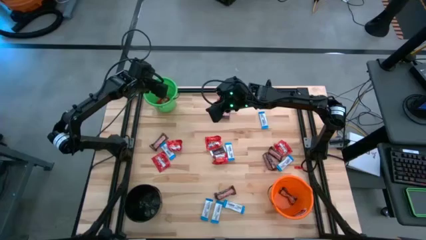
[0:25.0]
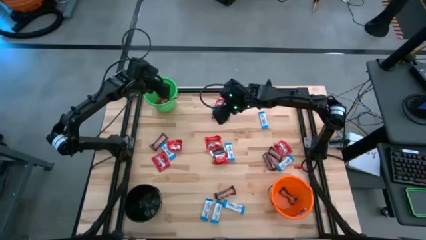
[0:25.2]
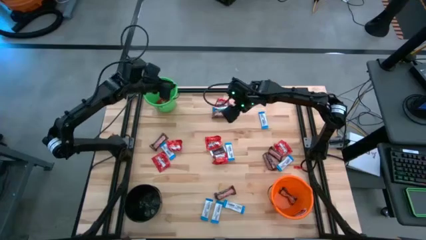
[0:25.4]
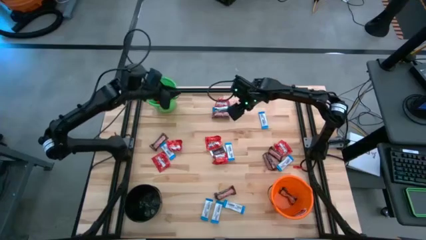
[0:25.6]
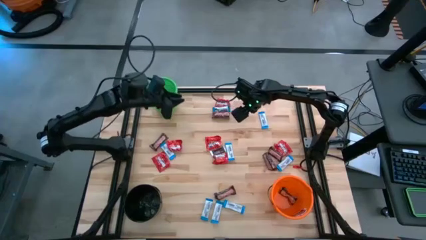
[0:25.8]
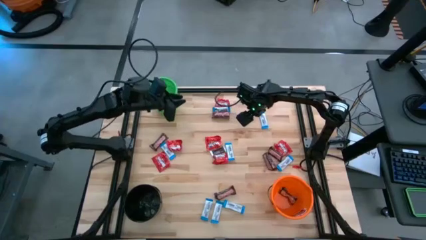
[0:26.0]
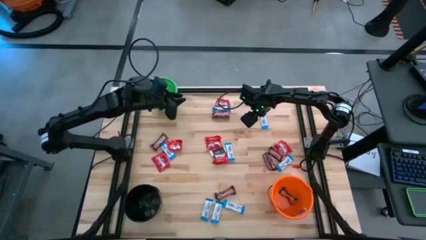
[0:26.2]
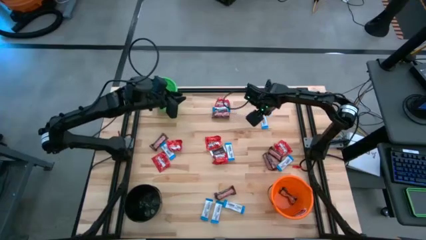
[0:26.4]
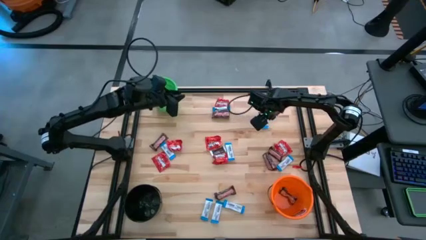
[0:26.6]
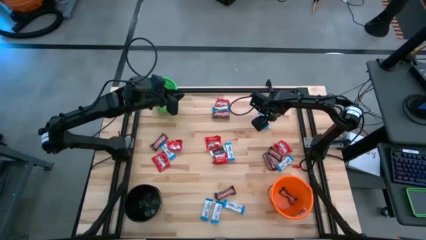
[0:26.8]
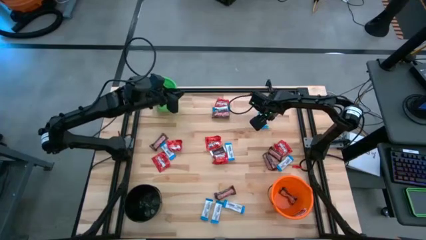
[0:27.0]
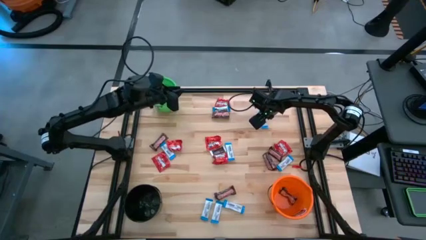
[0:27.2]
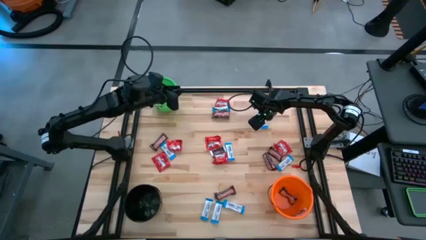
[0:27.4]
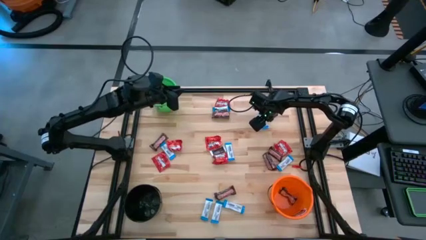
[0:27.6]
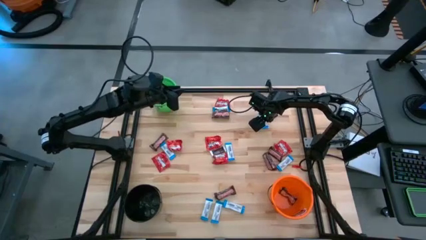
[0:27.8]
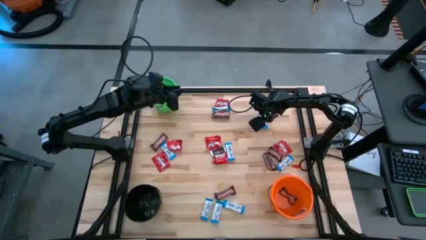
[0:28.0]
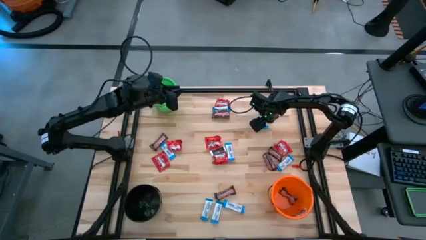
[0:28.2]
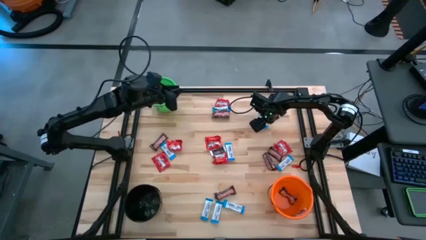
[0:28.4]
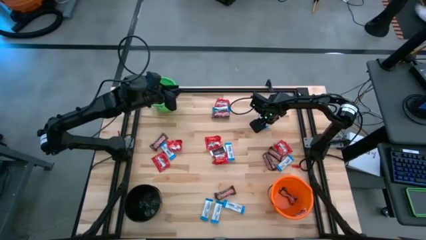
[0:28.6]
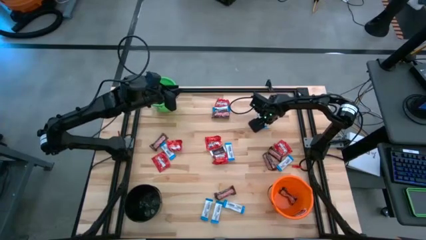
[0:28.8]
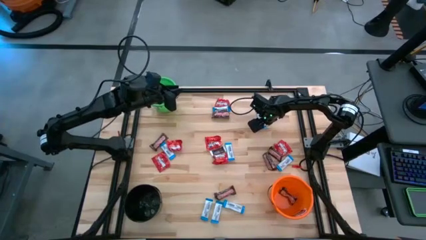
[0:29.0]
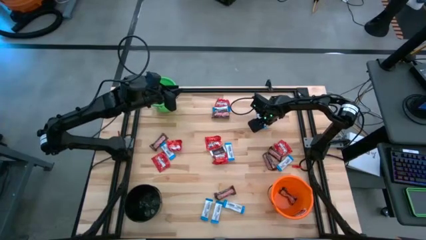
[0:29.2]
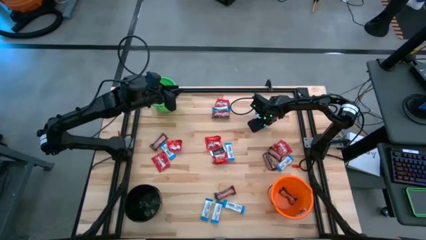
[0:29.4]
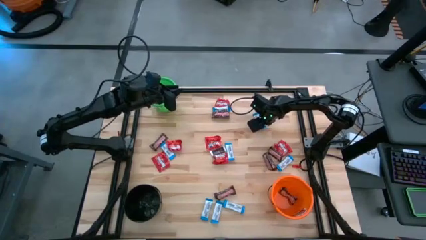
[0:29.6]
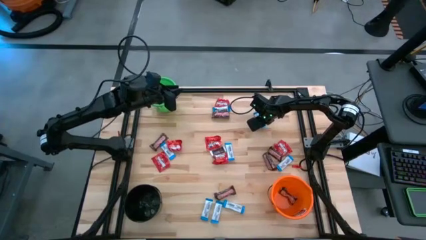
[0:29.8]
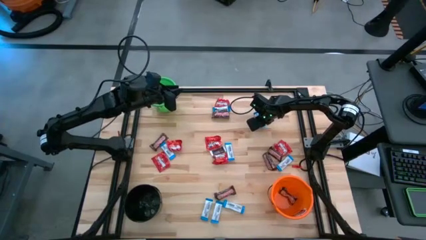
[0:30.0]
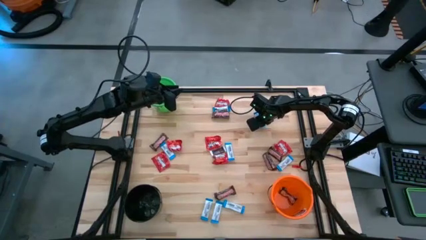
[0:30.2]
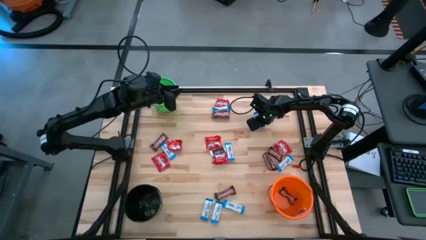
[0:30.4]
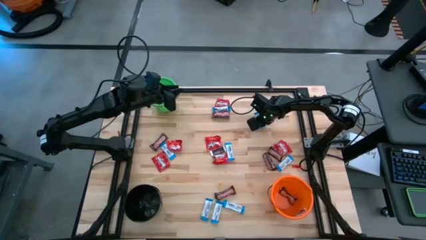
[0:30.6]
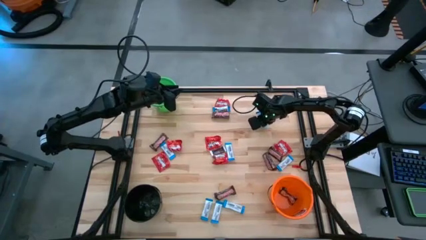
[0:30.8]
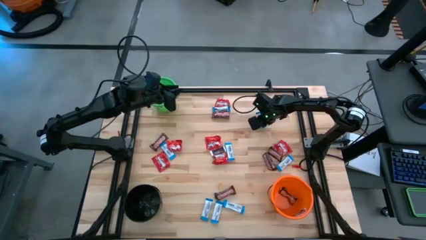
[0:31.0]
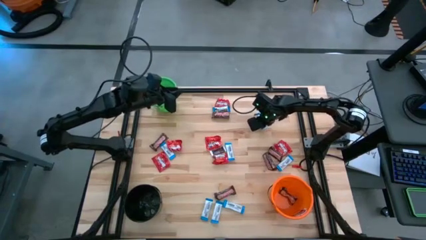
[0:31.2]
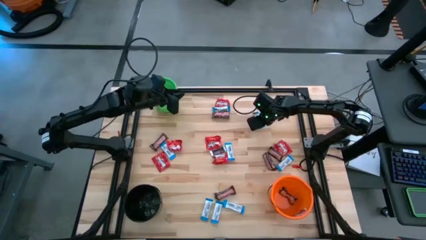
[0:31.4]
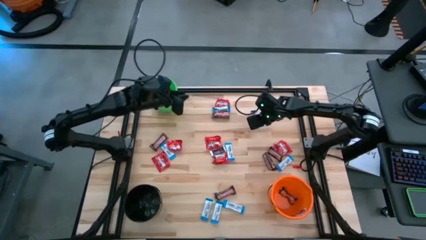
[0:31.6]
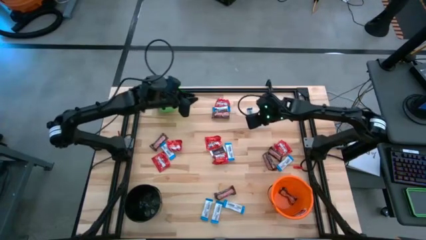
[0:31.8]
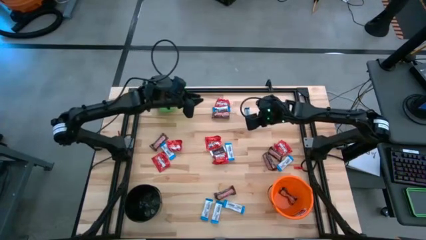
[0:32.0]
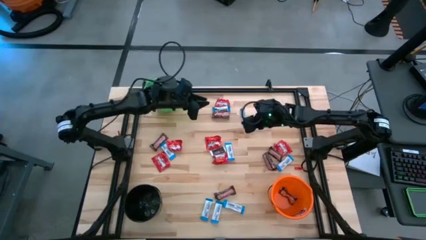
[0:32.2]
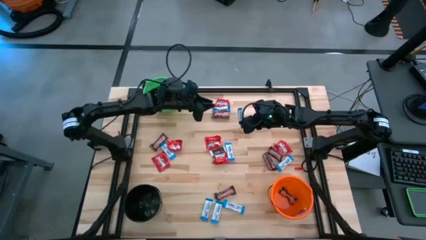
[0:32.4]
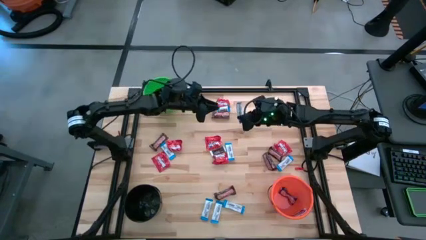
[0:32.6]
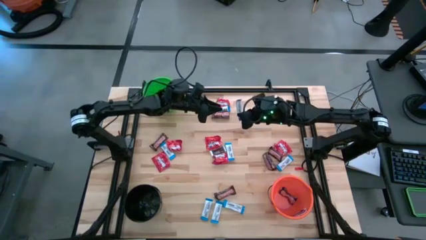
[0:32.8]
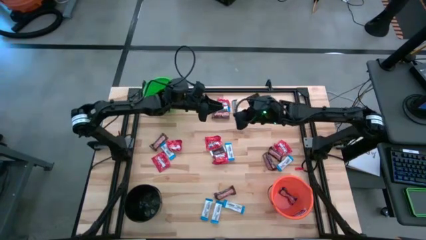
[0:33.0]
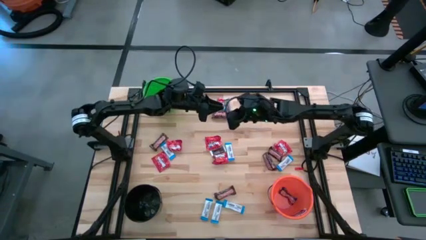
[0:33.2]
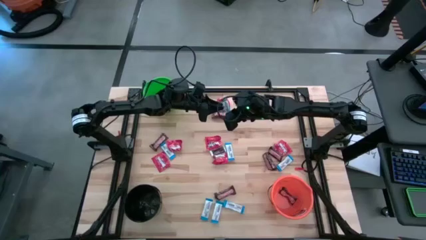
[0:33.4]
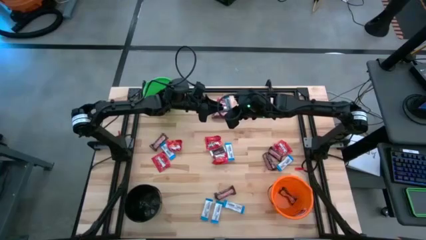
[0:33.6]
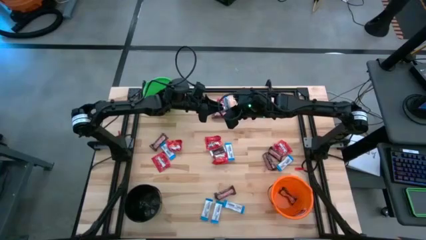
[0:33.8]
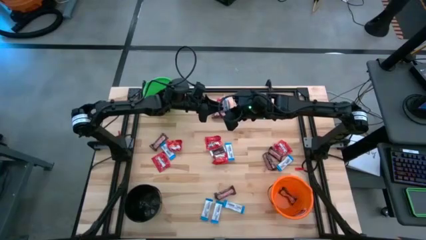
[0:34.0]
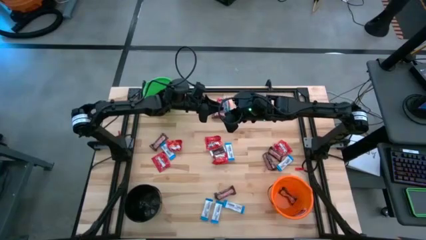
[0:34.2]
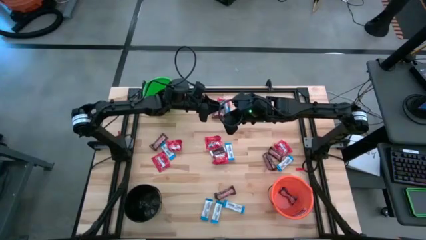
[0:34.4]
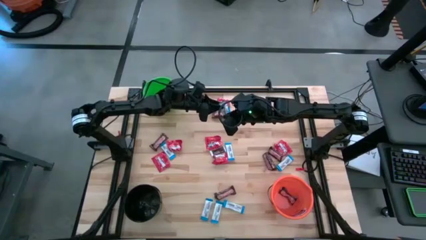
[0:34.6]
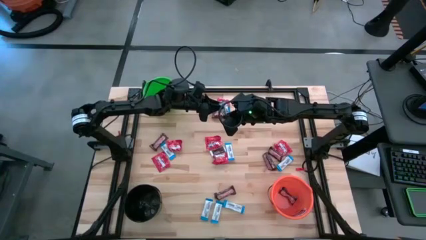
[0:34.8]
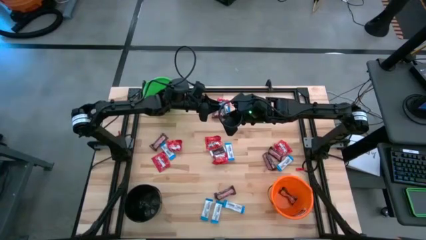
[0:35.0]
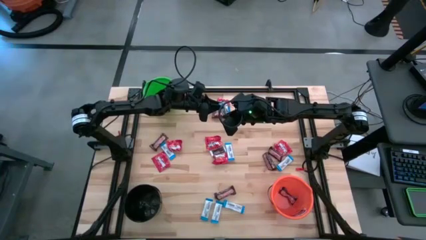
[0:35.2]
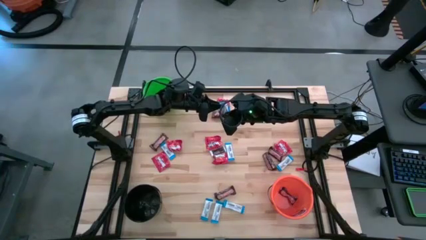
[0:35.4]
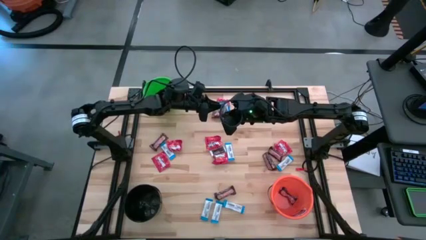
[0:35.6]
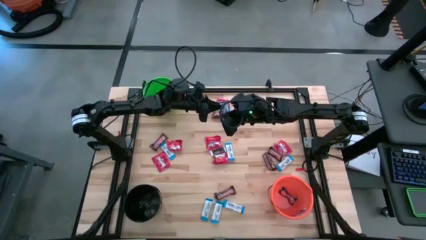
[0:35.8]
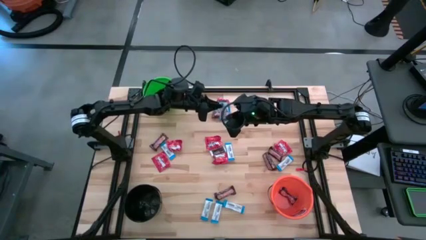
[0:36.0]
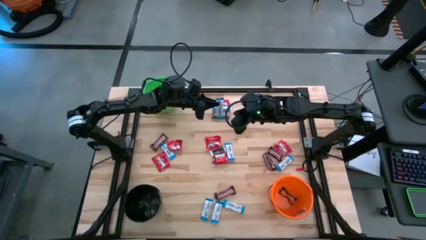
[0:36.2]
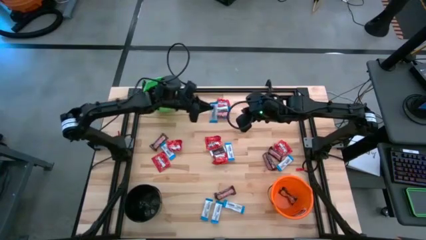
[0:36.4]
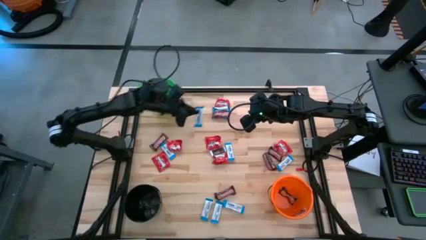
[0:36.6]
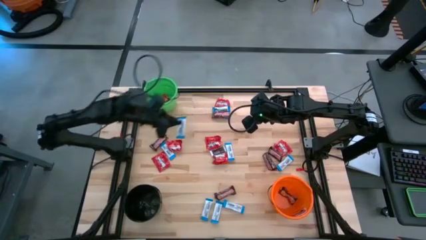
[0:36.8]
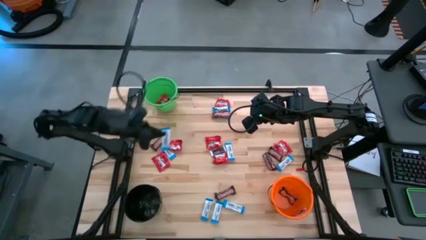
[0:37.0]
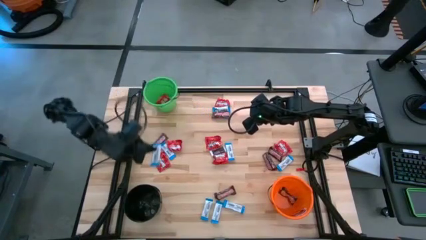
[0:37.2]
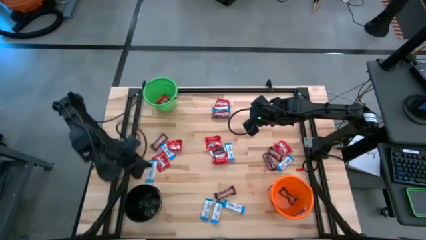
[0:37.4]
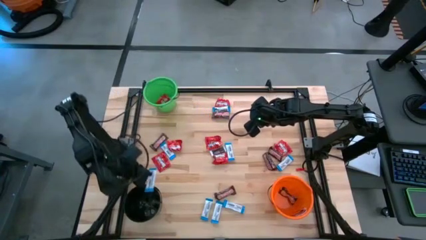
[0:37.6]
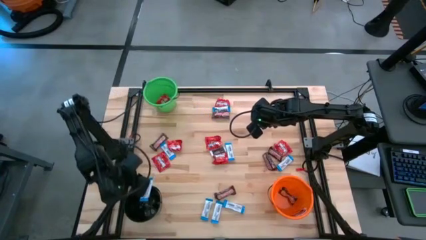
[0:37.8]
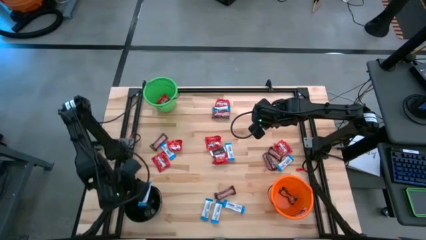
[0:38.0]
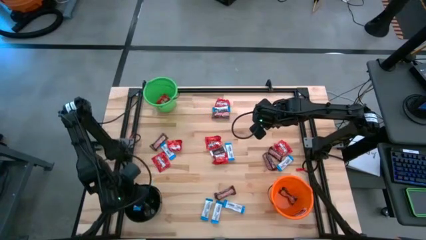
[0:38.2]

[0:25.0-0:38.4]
Task: Sort candy
Put the white chocolate into the black bucket

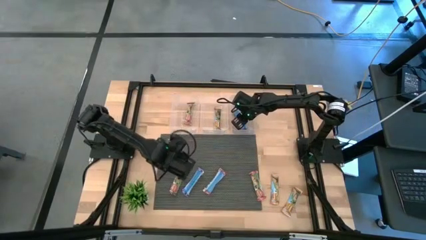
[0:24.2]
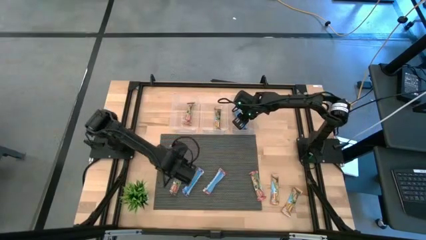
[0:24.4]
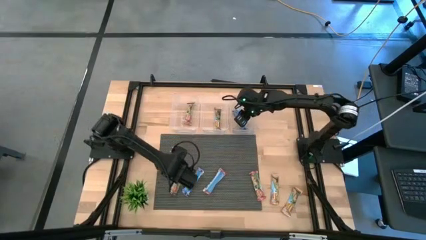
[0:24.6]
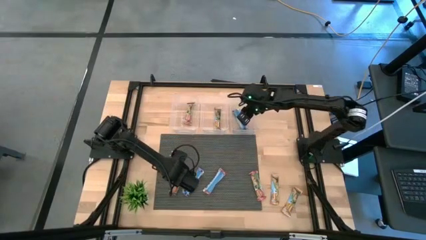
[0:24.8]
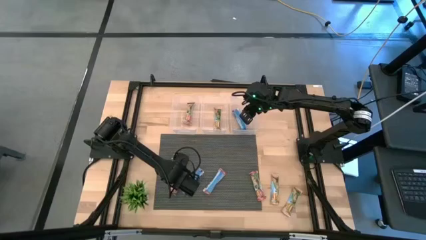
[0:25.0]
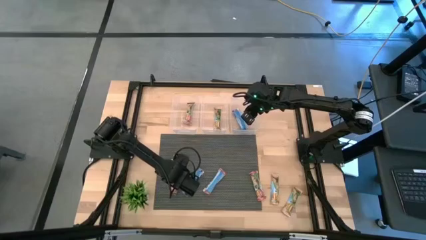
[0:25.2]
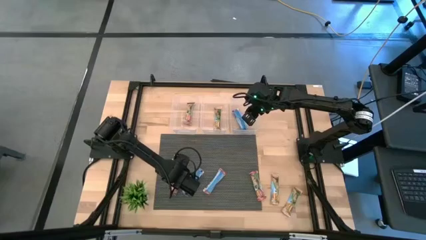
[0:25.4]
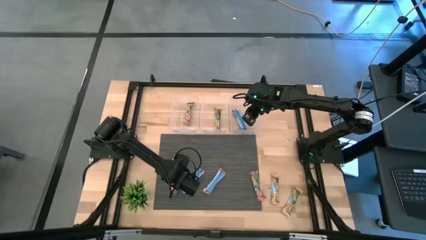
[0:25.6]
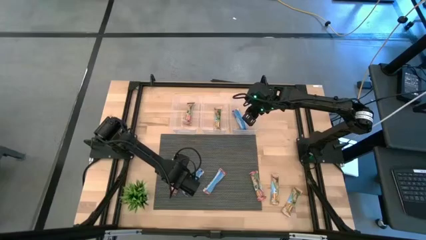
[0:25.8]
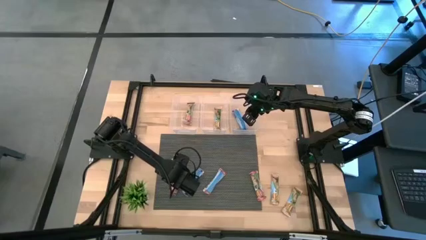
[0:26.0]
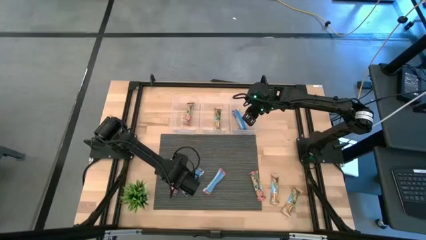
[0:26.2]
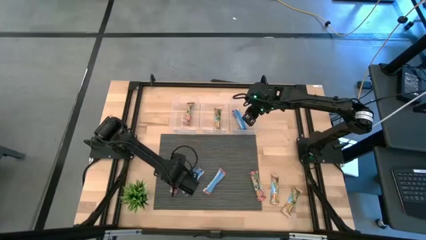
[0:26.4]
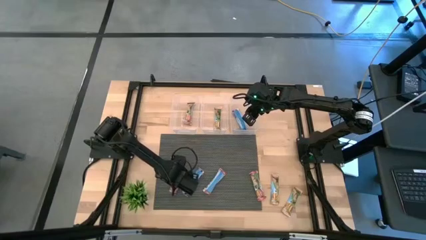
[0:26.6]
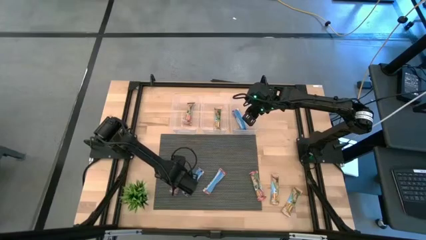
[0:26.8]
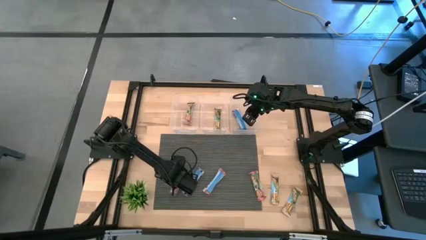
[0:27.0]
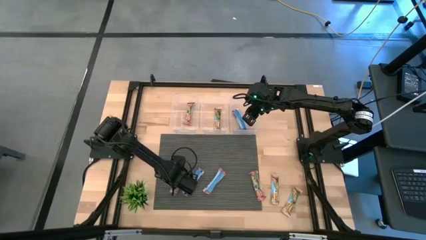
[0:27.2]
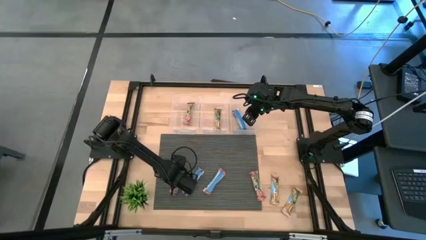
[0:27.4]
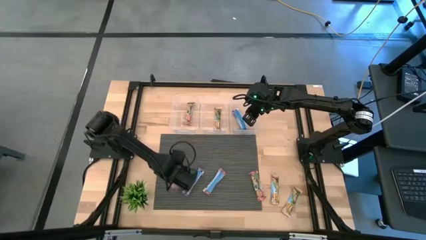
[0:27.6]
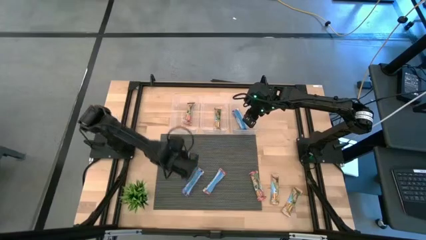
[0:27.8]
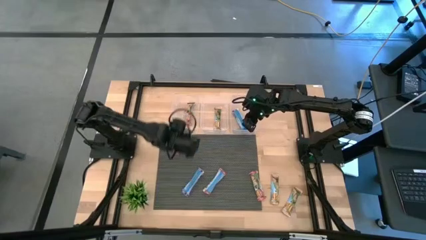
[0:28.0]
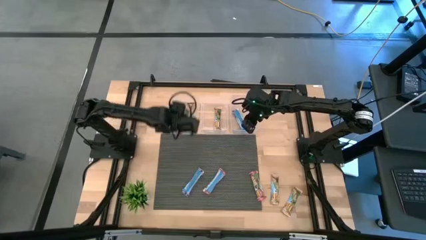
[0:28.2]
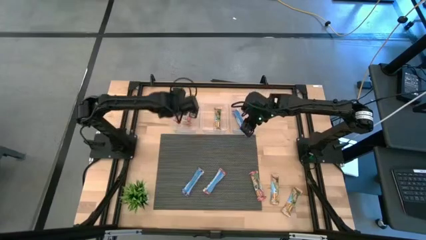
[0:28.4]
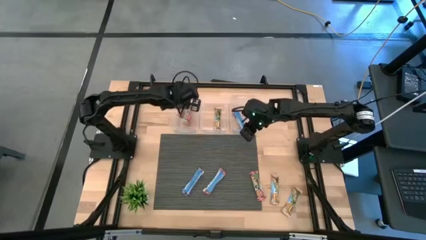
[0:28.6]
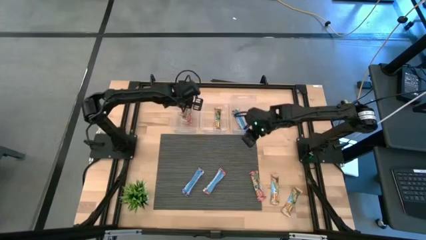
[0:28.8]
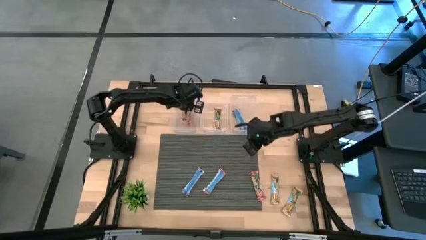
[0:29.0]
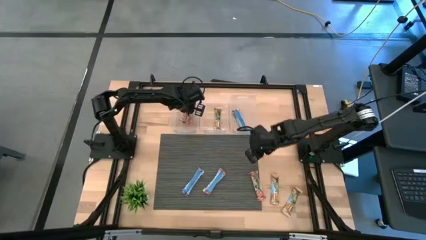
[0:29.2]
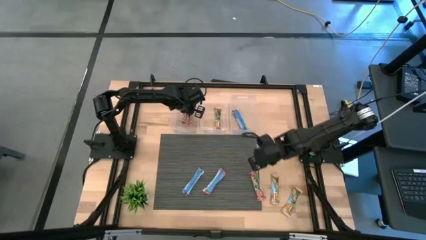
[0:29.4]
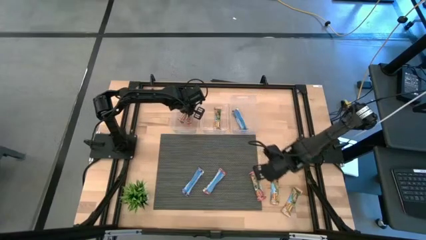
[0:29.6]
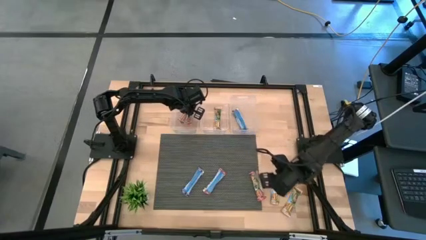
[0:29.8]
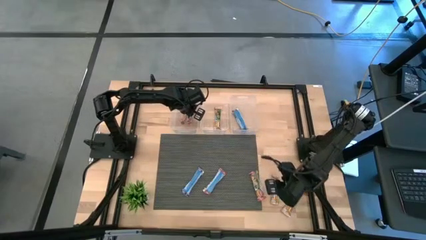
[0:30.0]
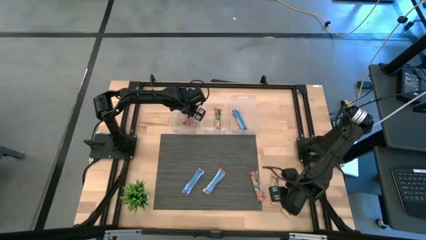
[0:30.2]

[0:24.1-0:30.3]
Task: Pick and place Granola Bars by type
Put the left red granola bar into the left transparent bin
